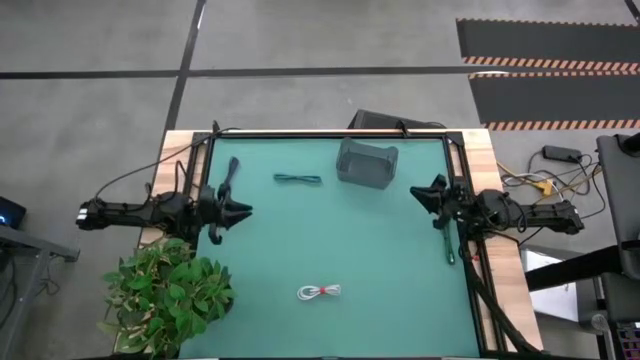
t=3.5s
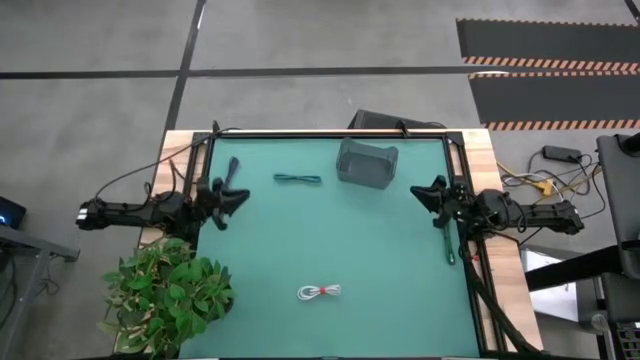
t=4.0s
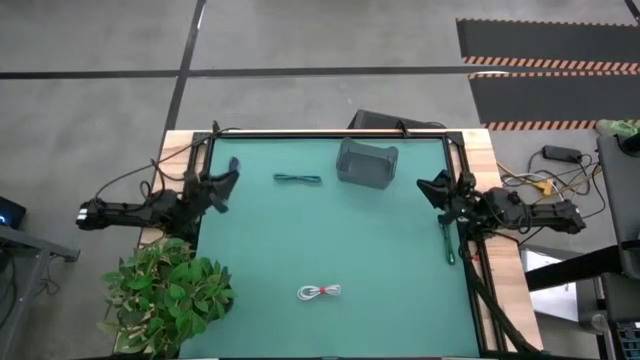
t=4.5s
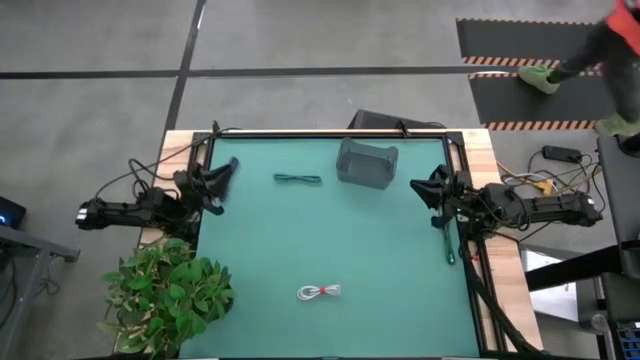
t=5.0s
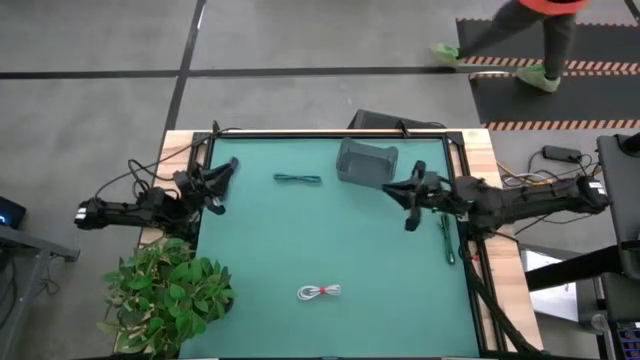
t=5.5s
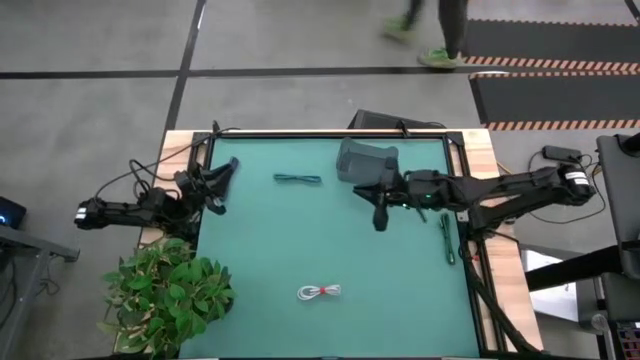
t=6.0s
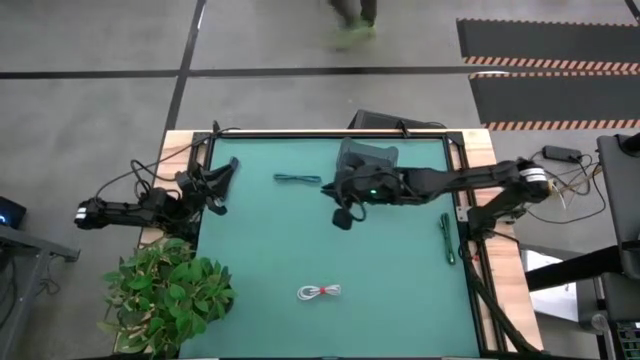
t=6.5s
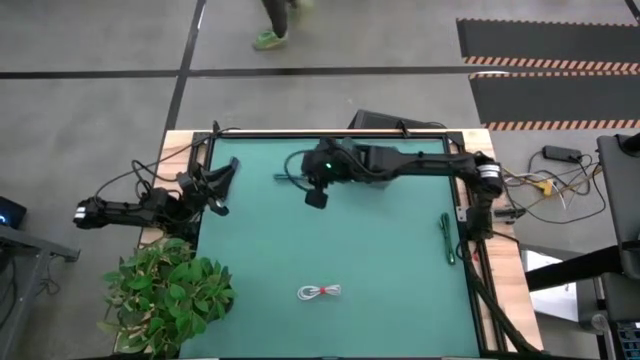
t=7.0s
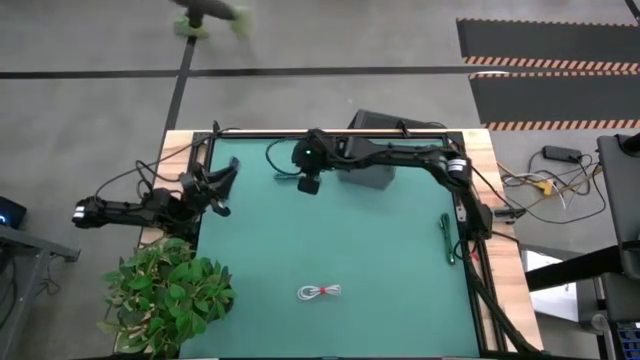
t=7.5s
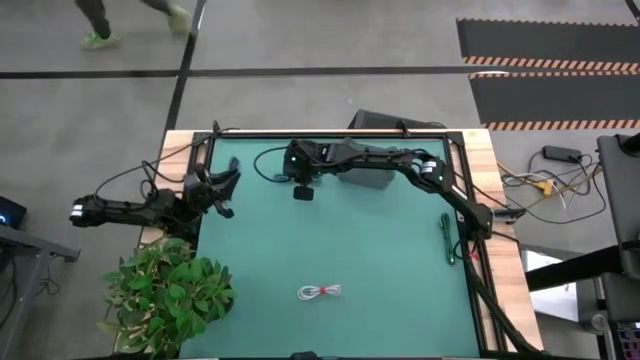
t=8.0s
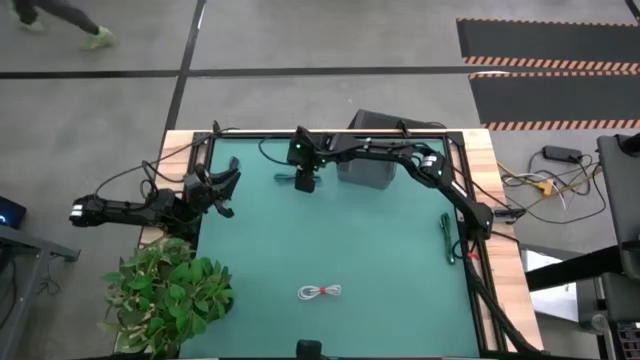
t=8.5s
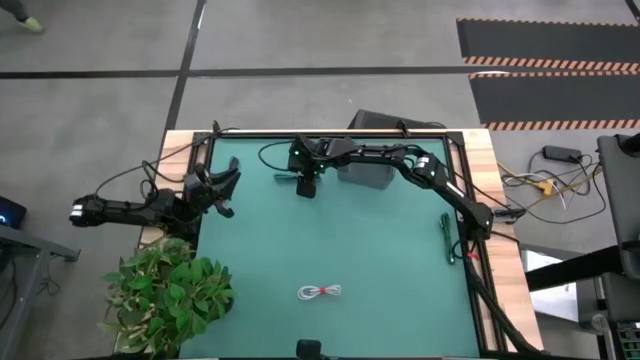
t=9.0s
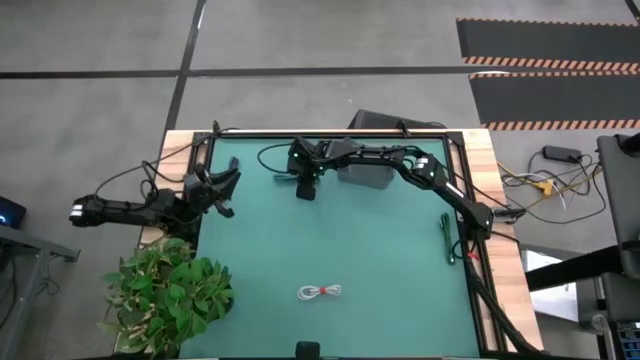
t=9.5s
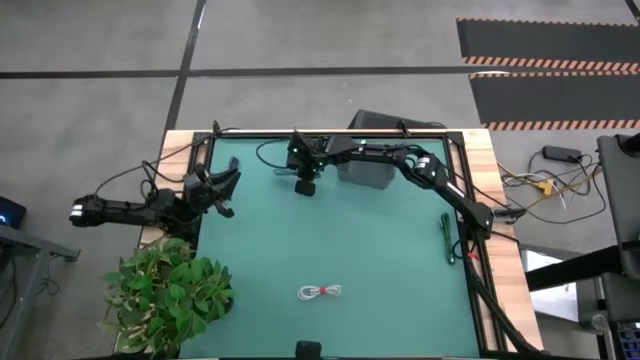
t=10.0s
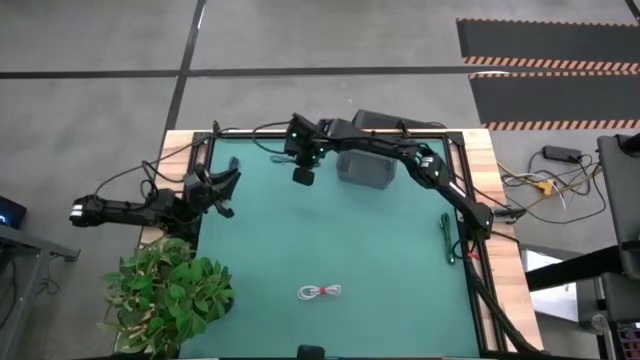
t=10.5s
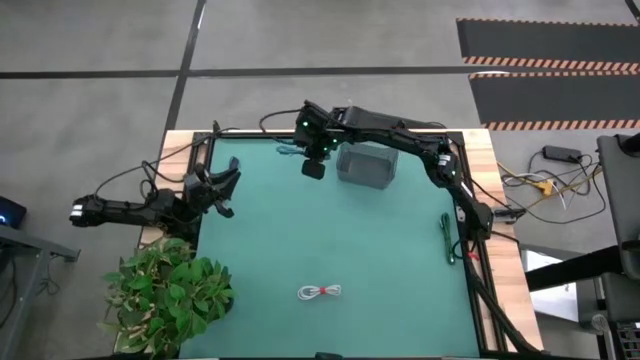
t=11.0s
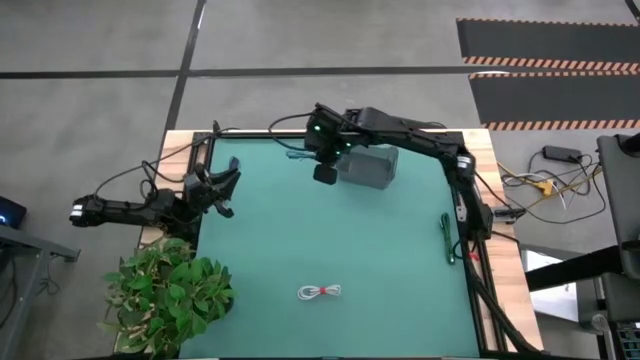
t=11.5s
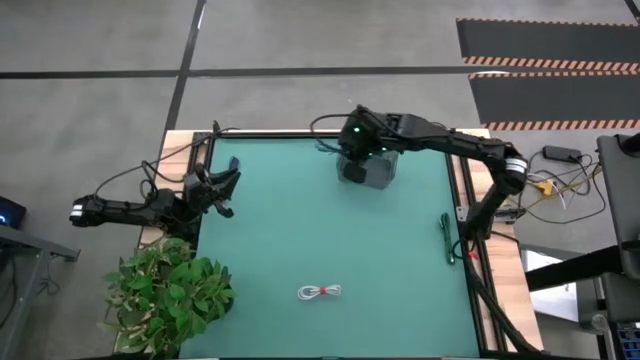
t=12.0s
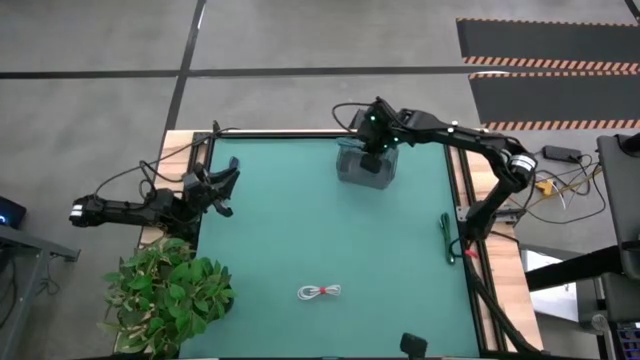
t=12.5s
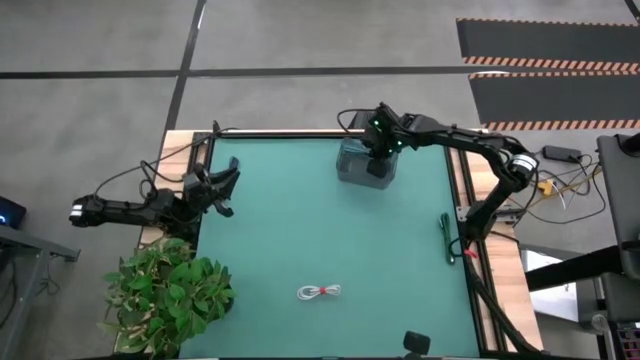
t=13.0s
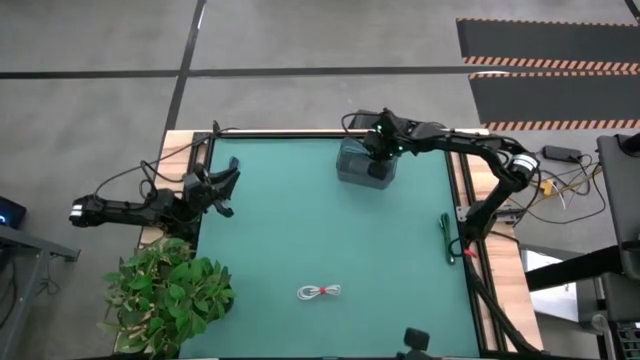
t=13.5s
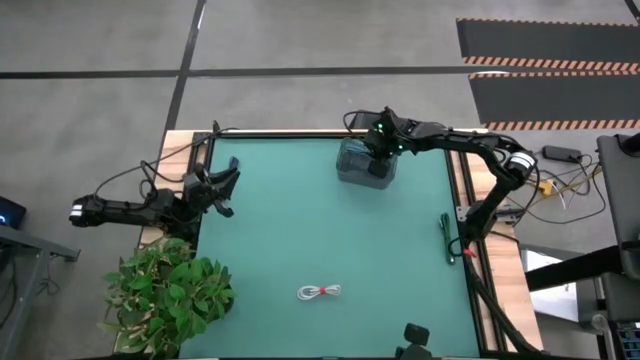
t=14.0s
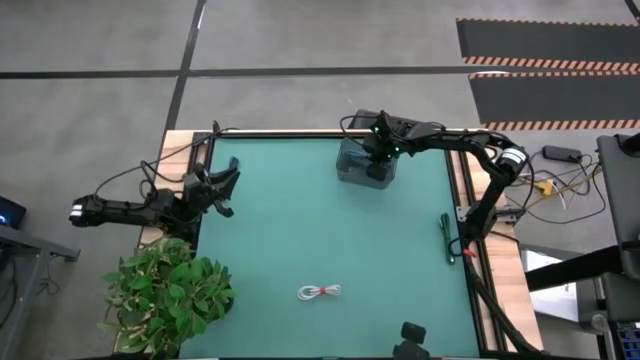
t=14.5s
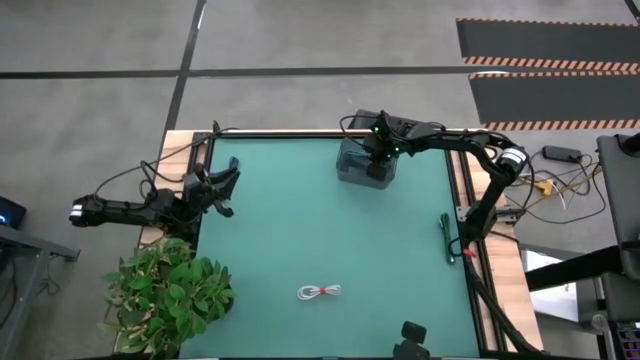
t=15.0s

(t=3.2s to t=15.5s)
Task: Pick and place USB-C Cables
Put the blue USB cable into the black bin

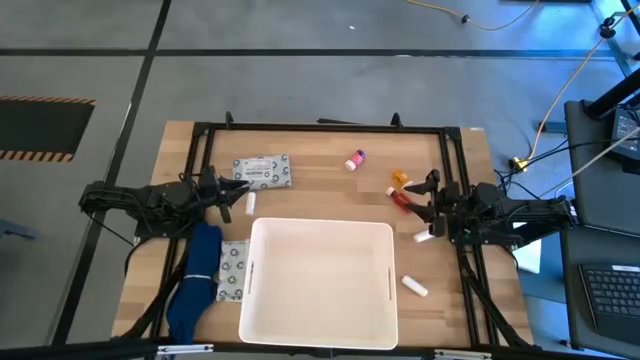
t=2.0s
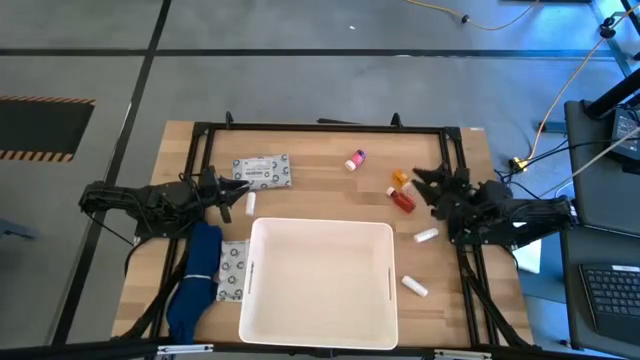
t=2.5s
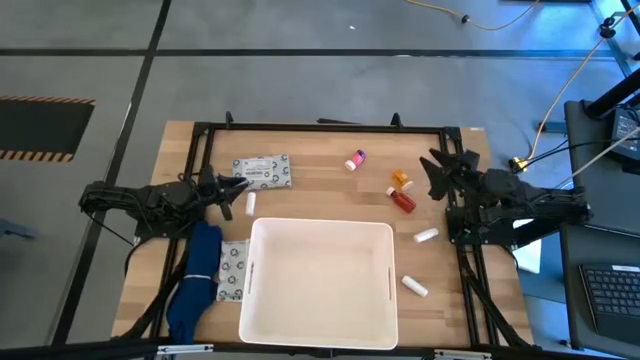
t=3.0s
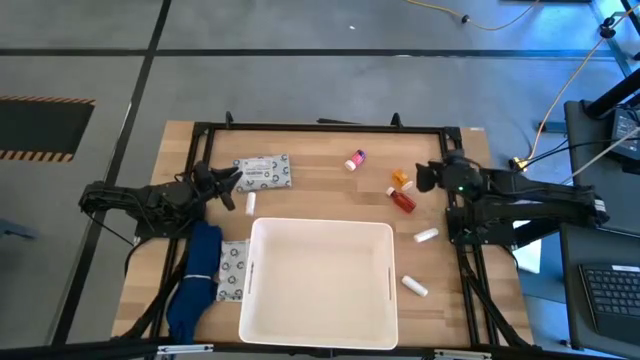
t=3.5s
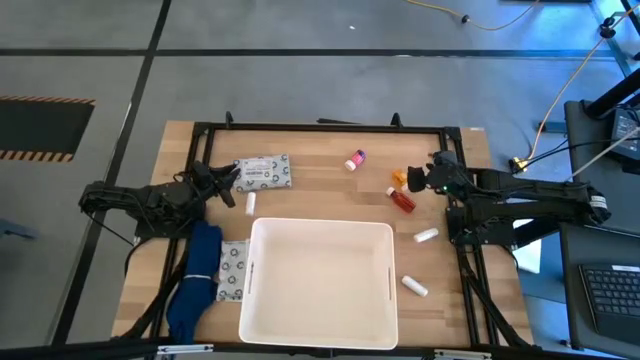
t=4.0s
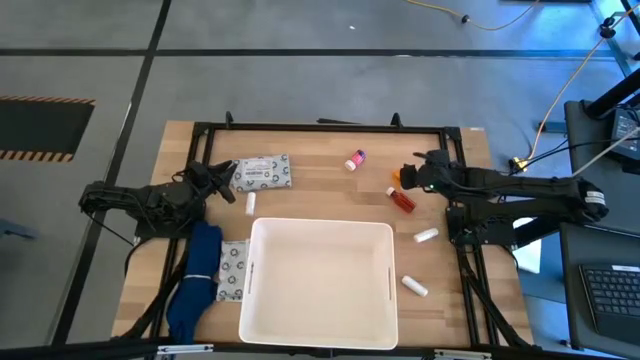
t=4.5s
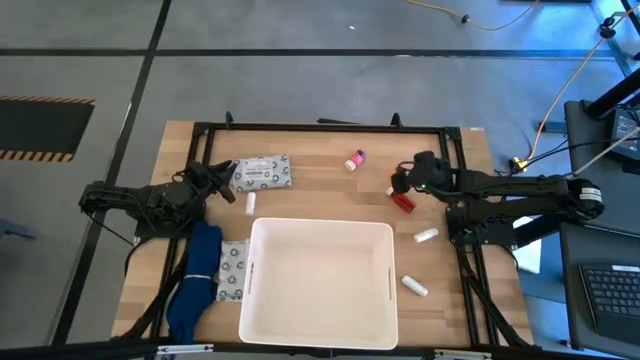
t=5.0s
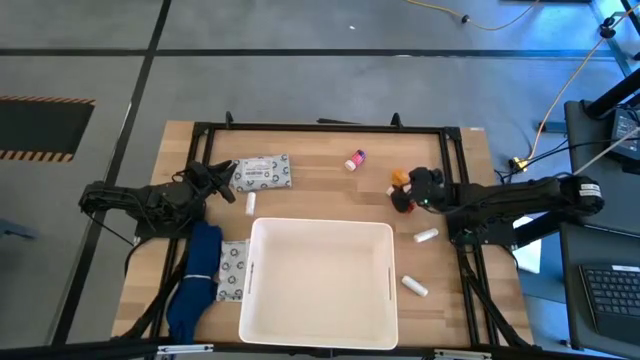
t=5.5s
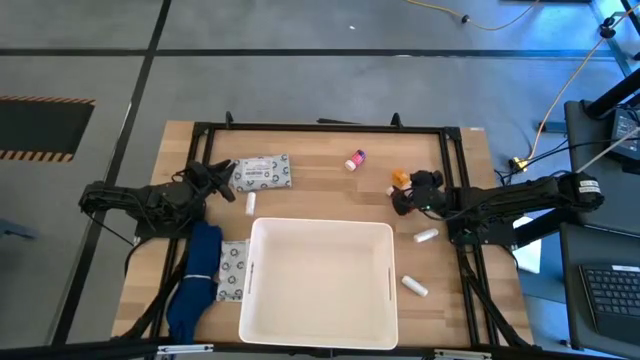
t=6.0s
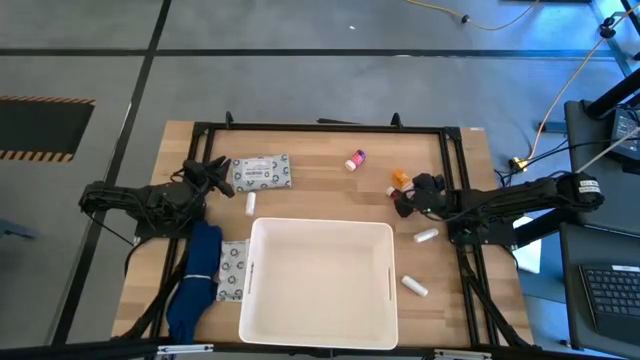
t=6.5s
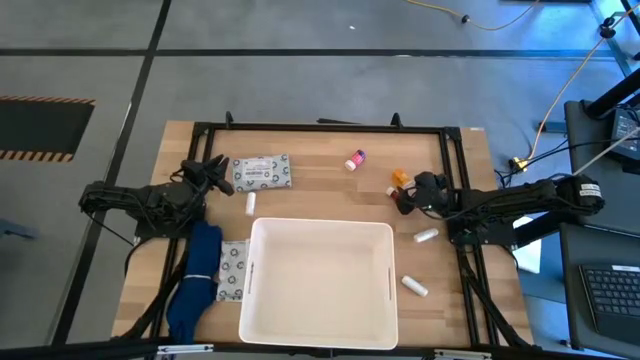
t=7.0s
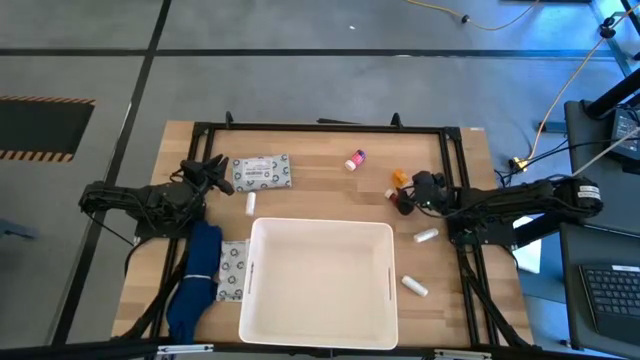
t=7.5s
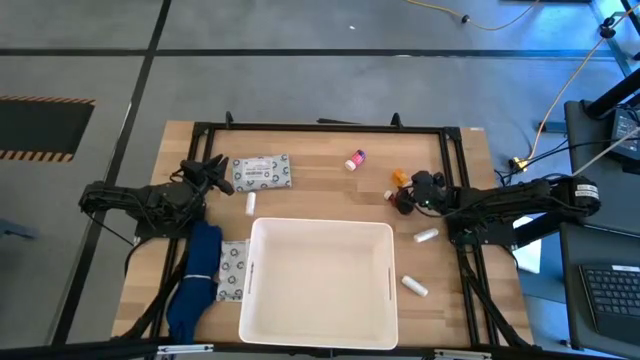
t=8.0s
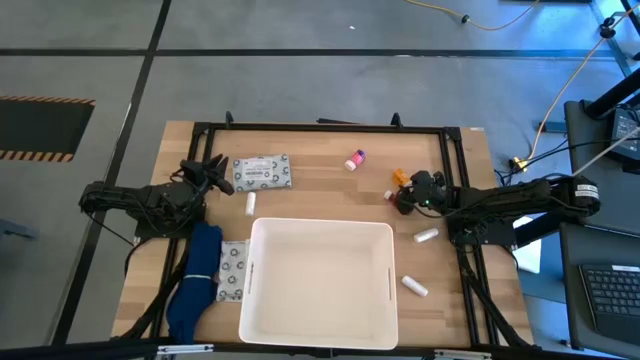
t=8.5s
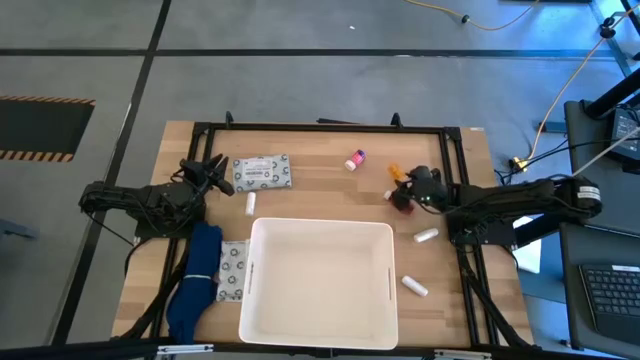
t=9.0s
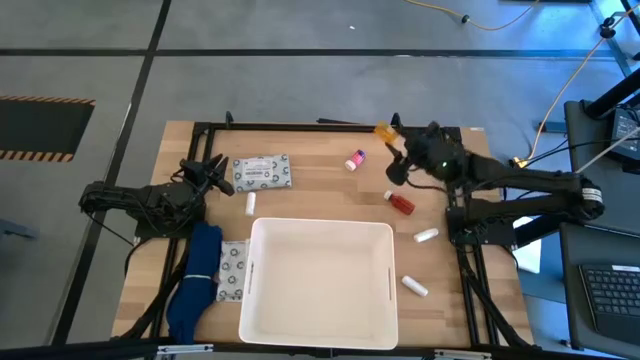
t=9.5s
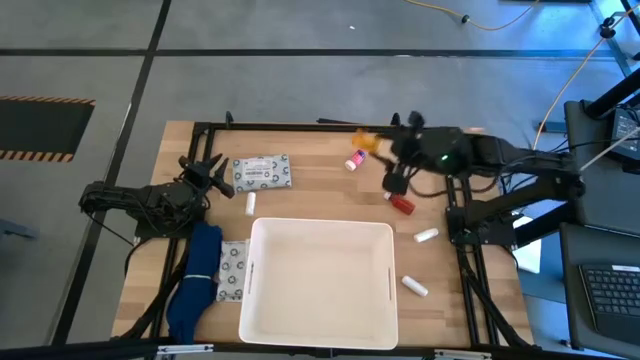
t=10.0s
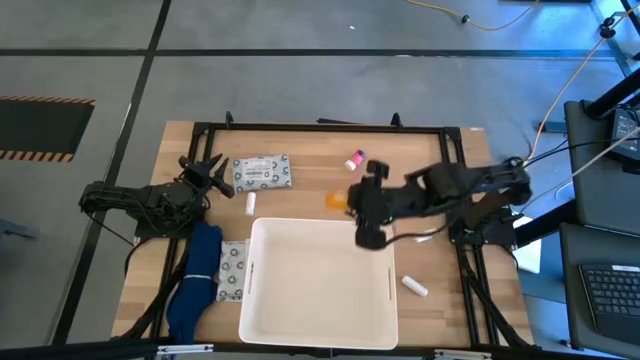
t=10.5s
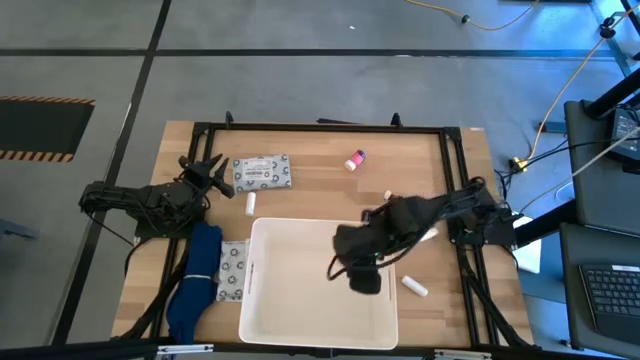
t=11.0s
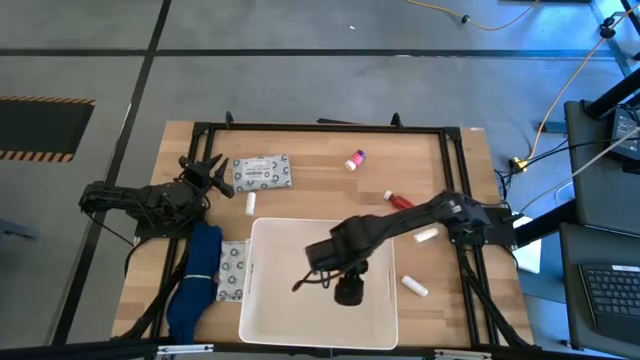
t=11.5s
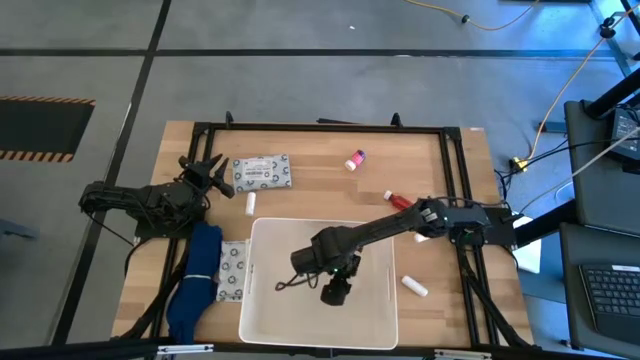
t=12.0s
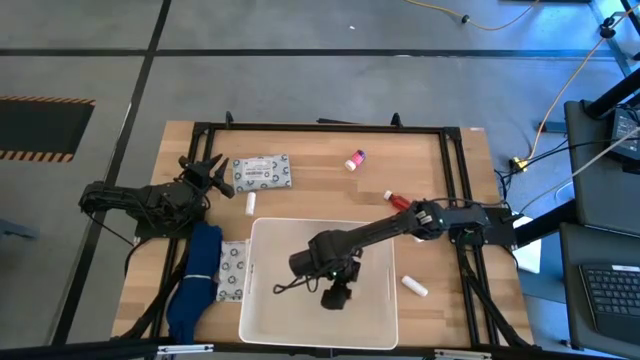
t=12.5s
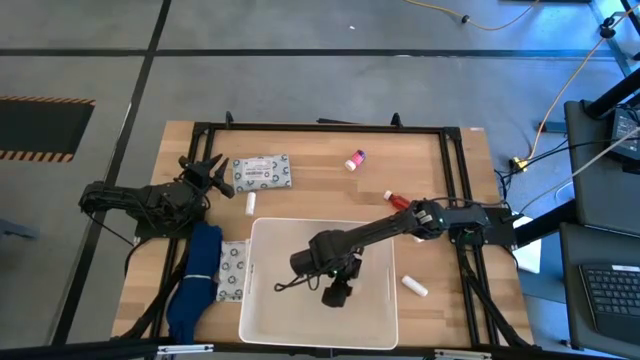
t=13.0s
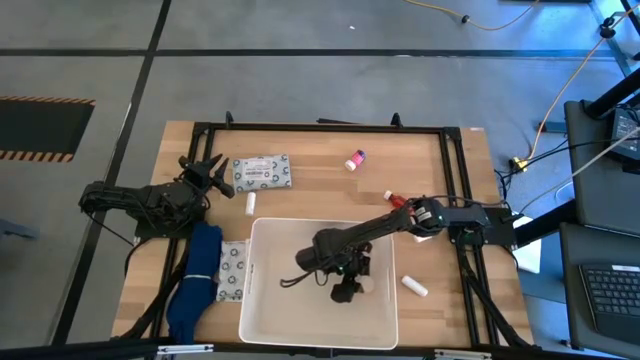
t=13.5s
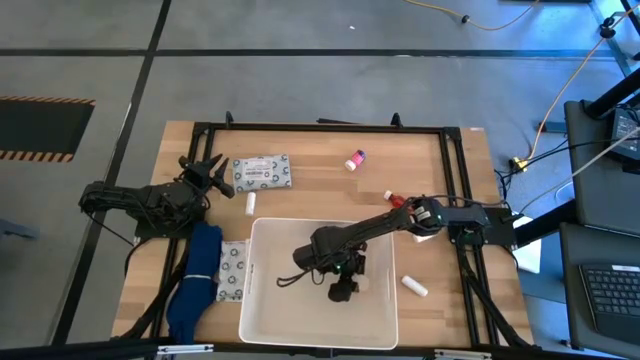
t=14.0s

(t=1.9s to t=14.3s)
Task: Pick & place medical supplies in basket/bin
Put the orange pill bottle into the white bin
